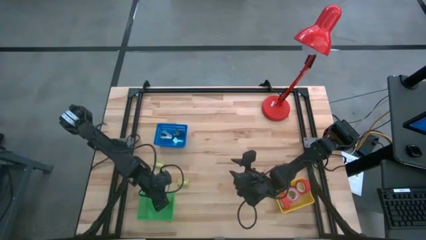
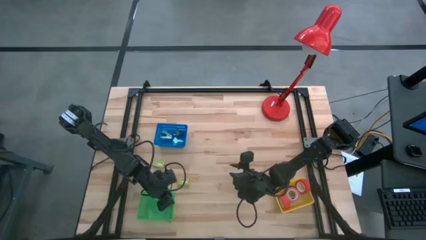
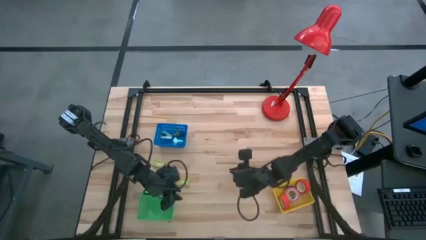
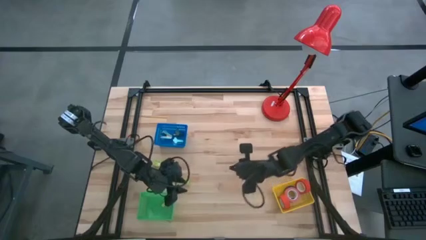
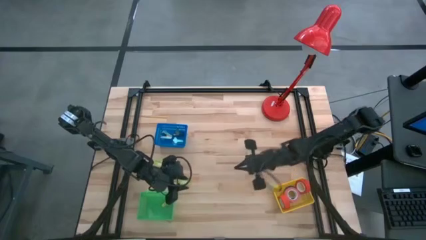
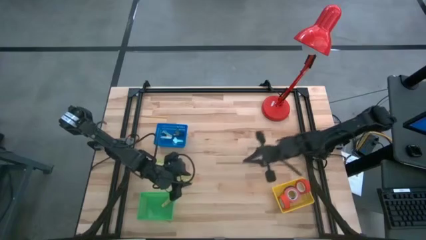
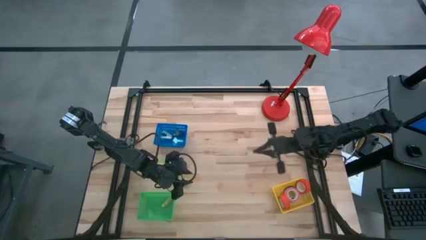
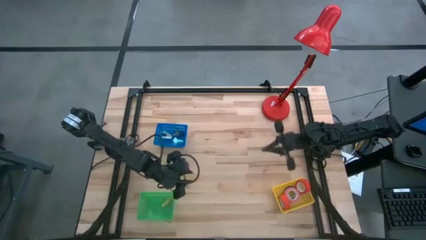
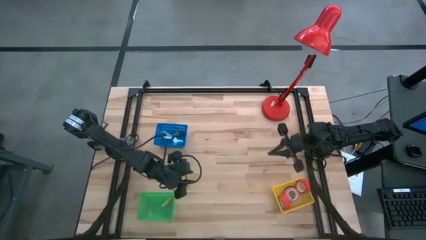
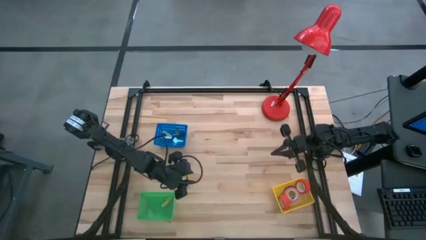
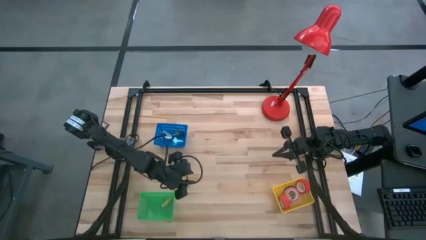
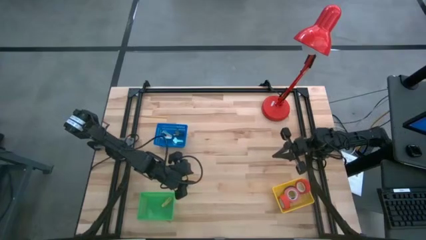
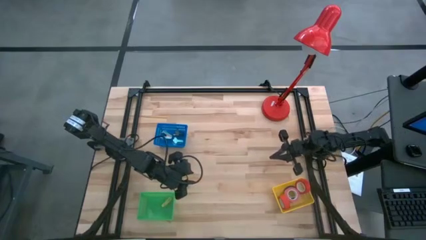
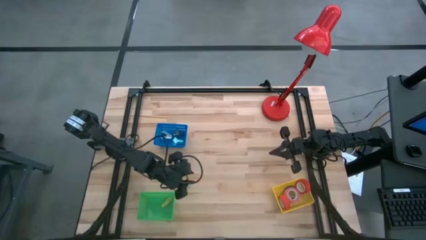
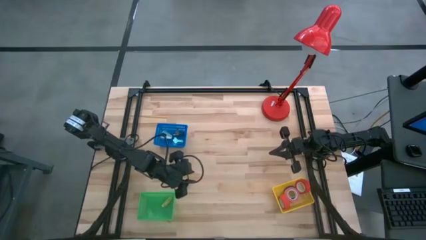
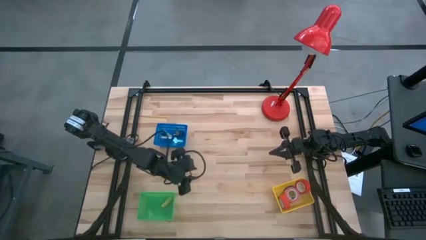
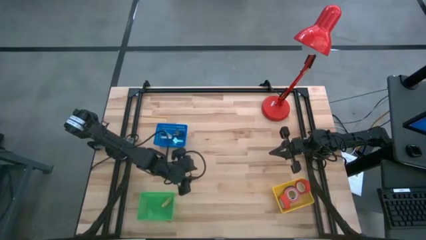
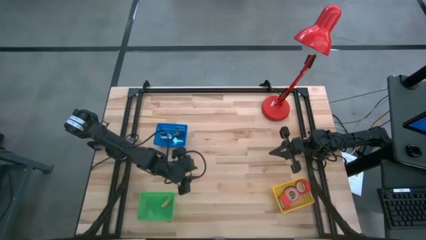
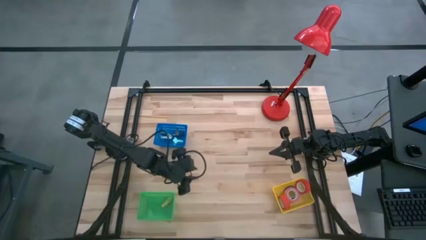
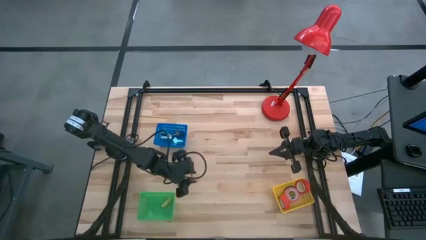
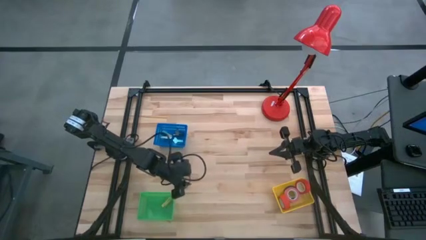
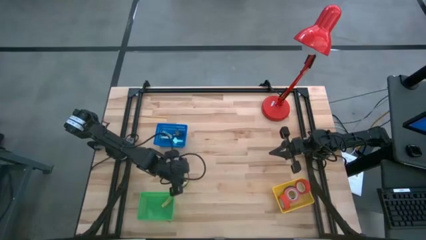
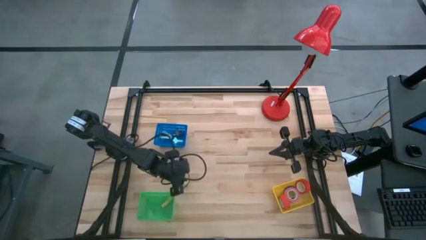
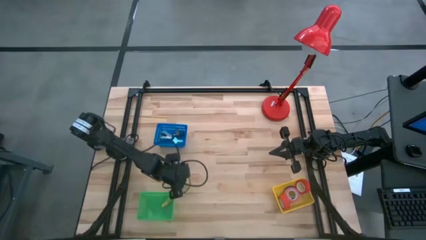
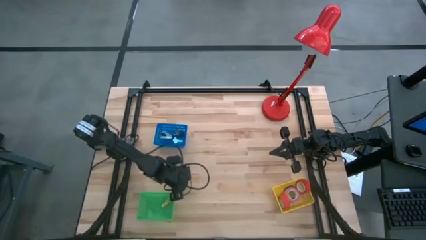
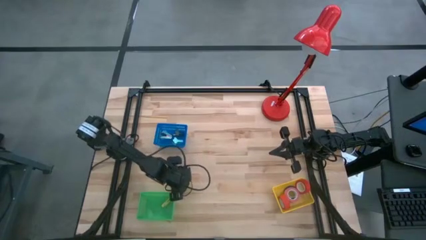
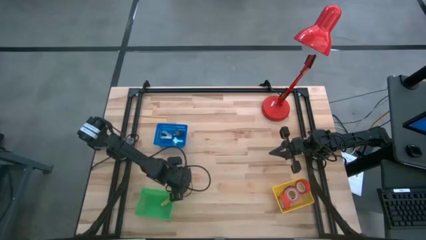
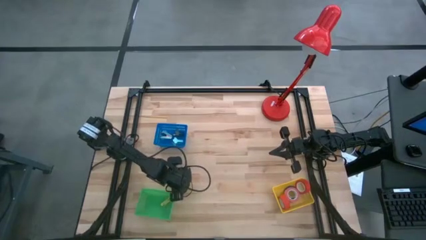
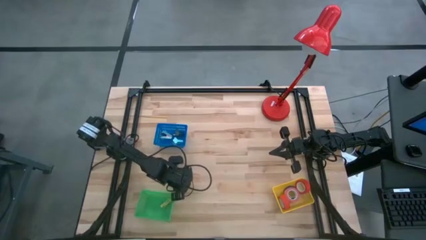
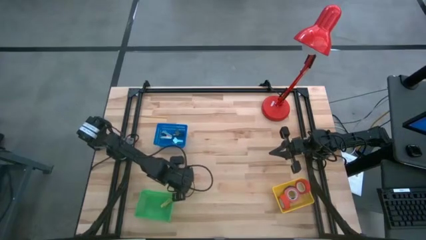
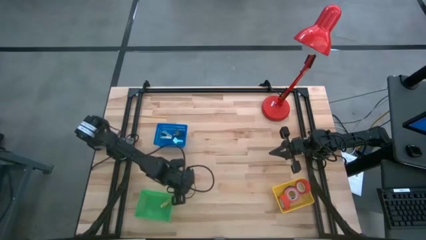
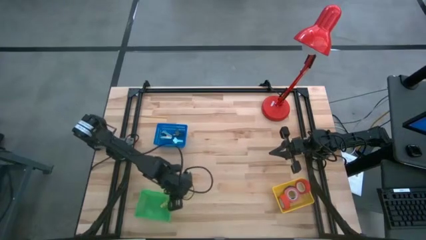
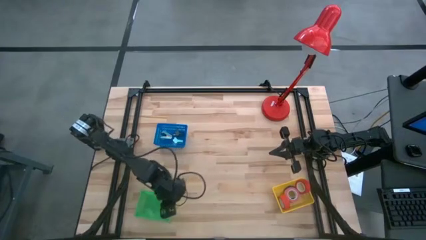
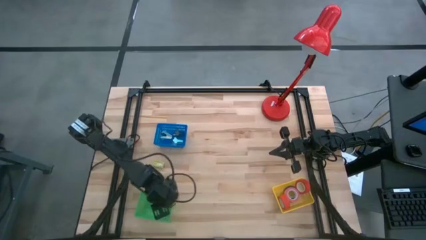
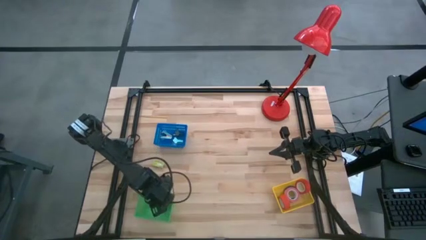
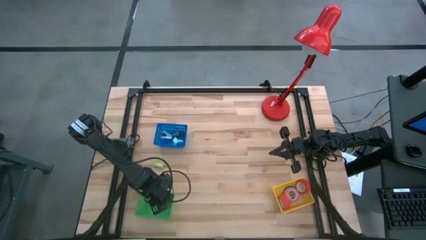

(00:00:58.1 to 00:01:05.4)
Task: Pick and place Stapler, Stapler remover, tape
Put the center green stapler pin box into the green bins

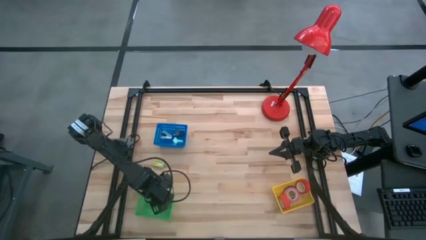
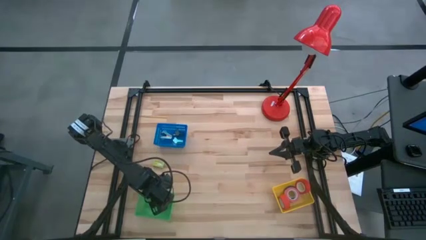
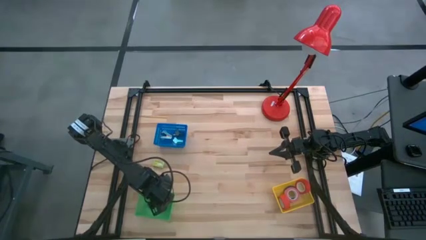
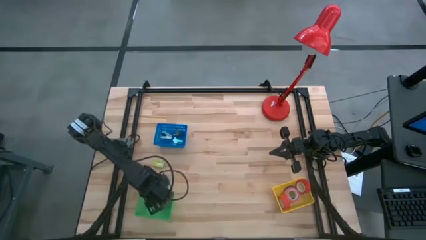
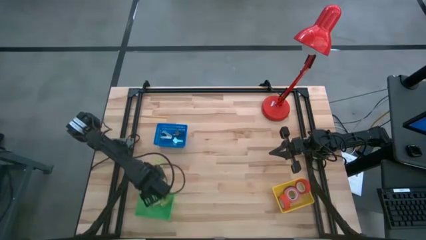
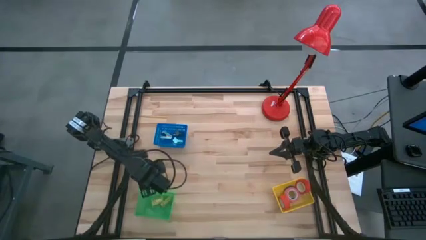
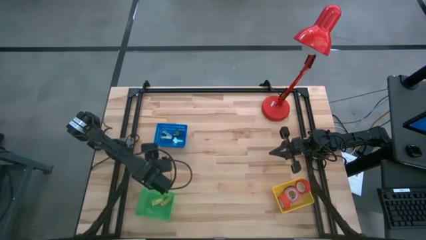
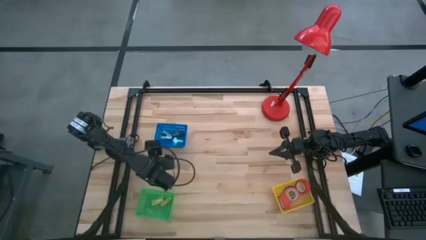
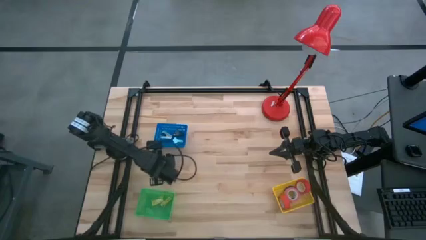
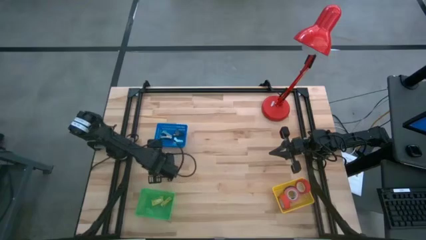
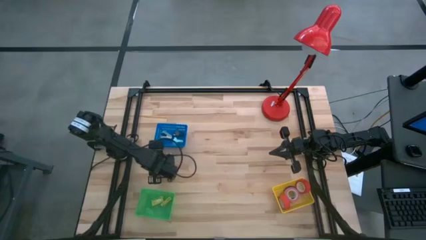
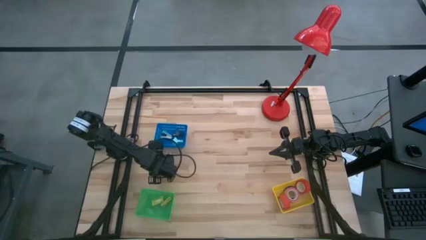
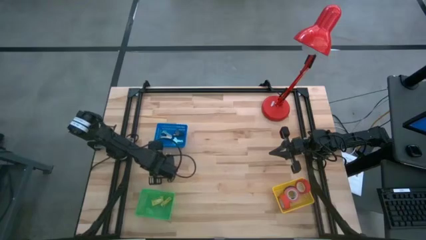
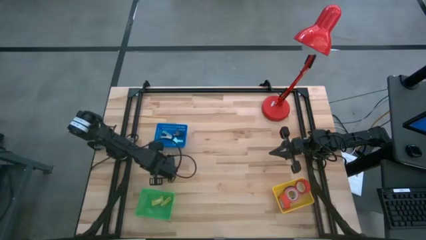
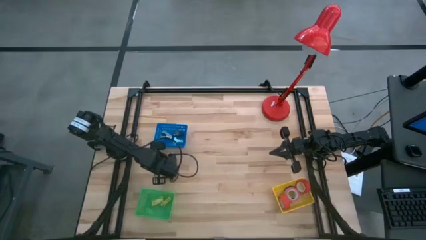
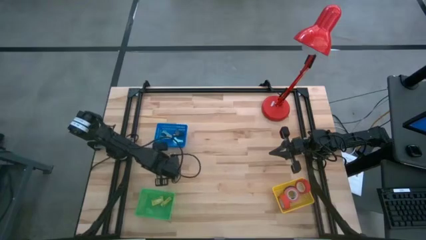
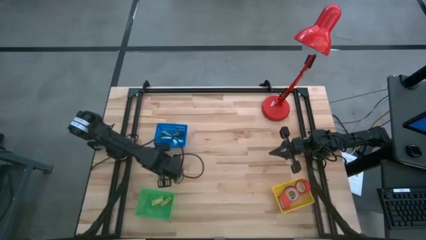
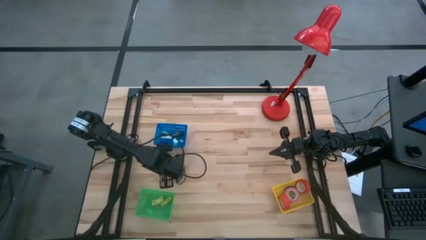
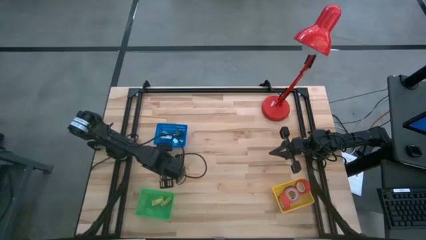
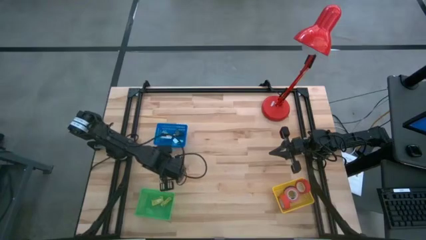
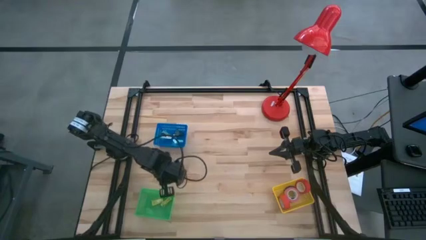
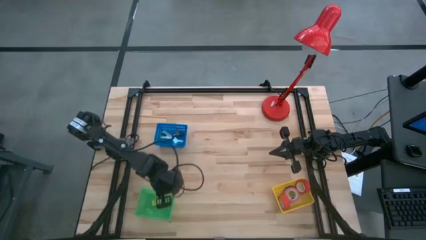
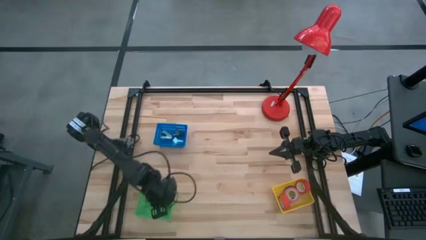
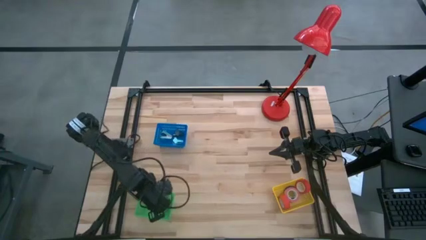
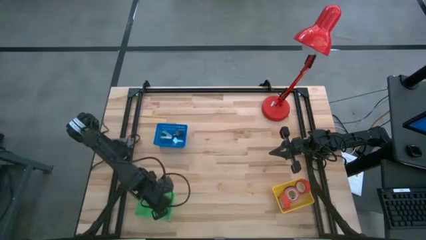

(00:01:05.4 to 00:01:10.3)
Put the green stapler pin box into the green bins

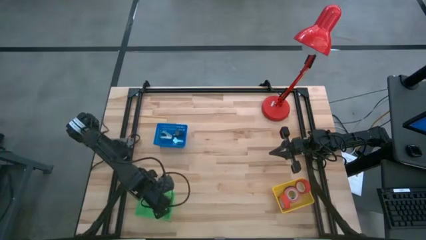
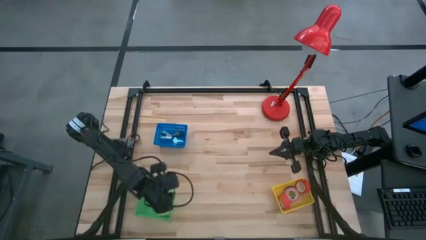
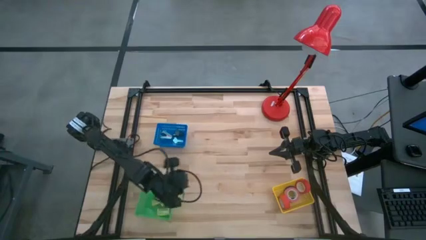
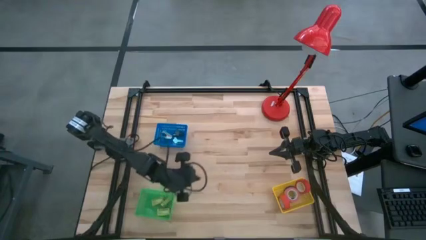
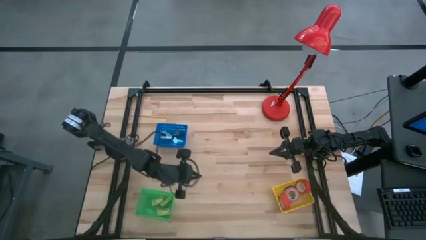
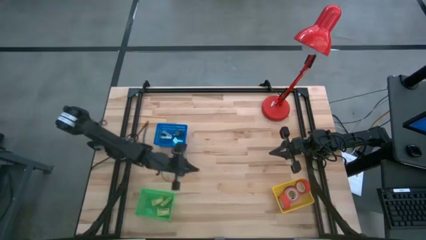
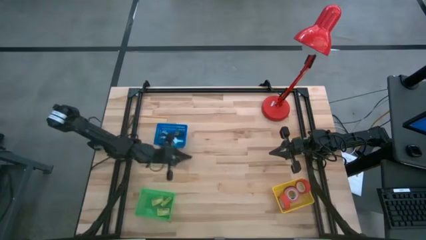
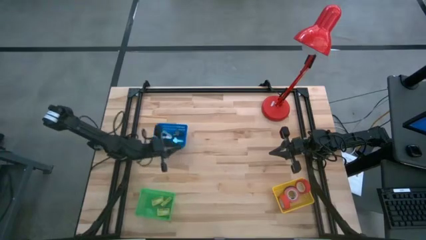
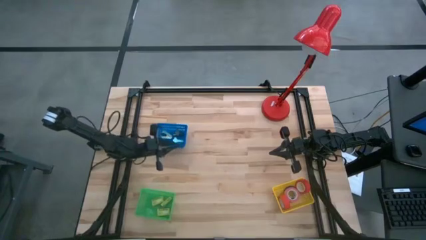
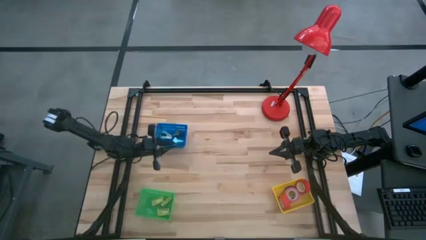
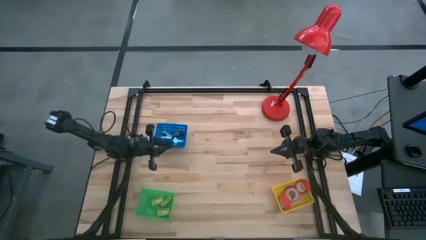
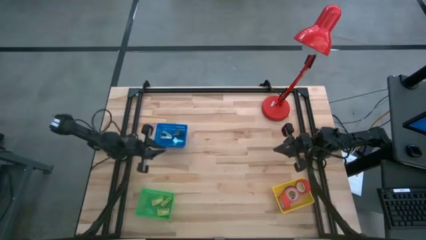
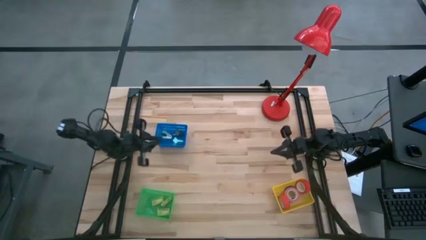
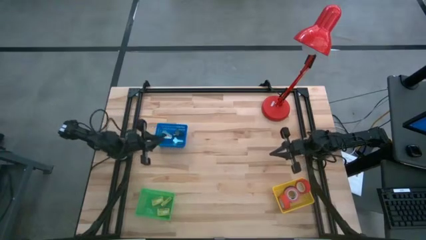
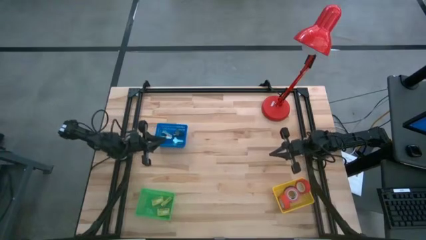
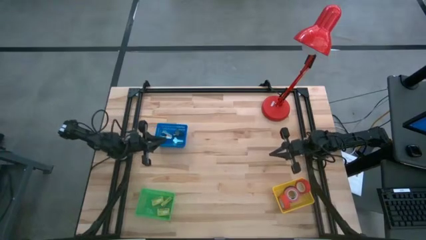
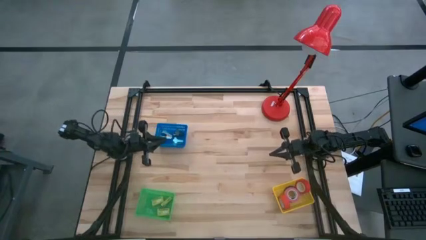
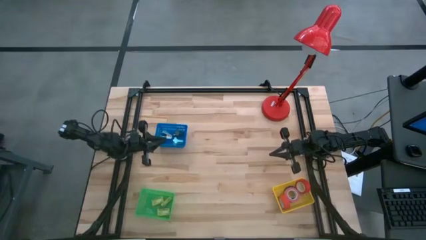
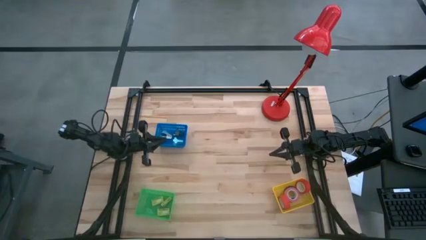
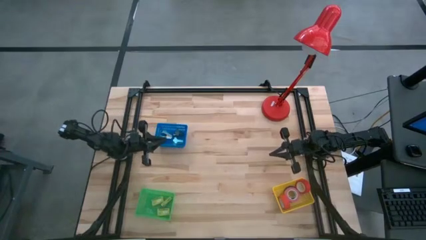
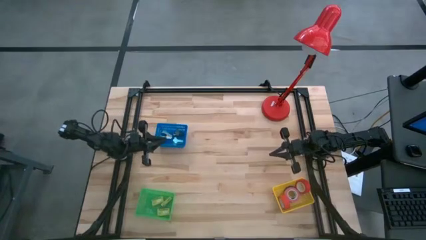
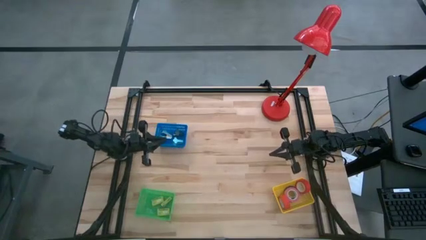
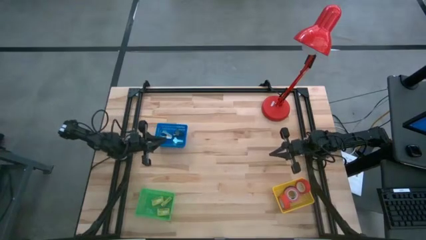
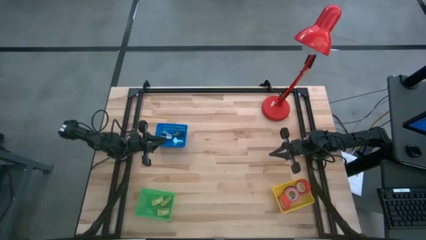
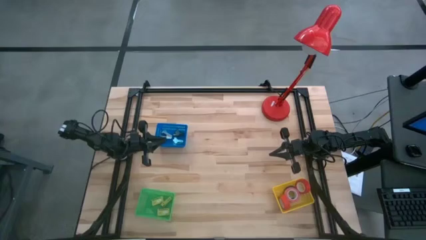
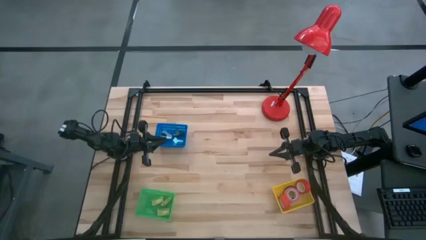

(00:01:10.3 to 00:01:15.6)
Return to Home Position
